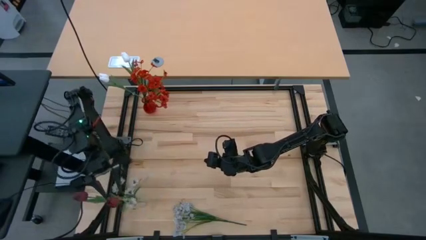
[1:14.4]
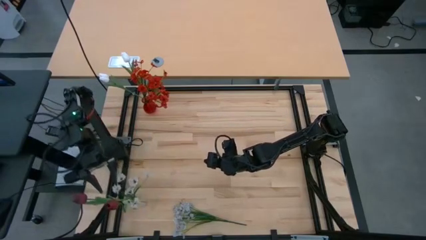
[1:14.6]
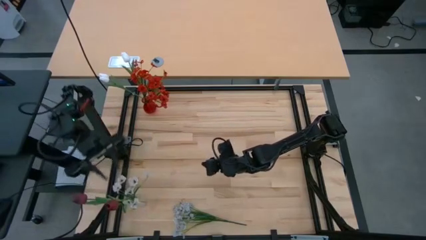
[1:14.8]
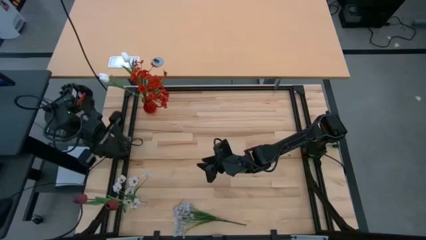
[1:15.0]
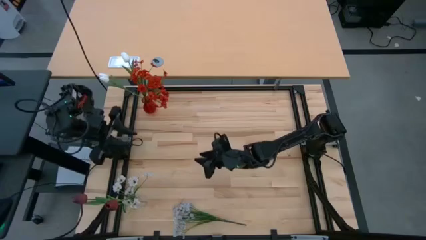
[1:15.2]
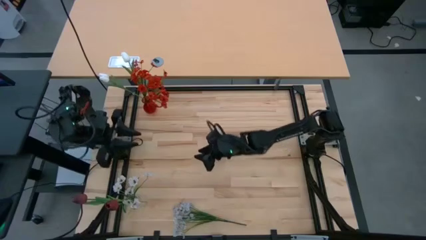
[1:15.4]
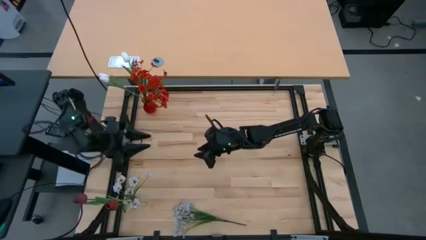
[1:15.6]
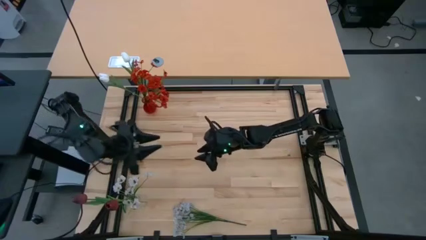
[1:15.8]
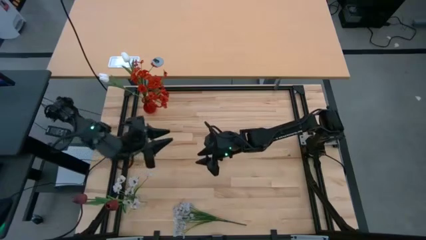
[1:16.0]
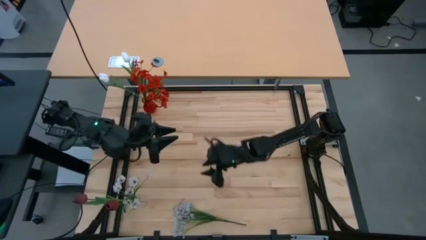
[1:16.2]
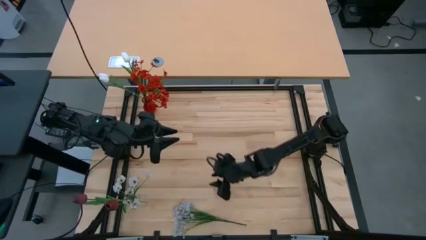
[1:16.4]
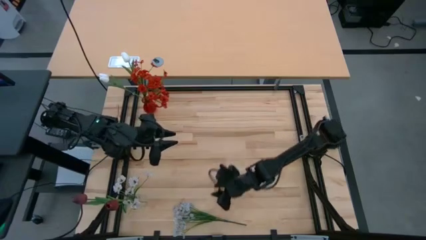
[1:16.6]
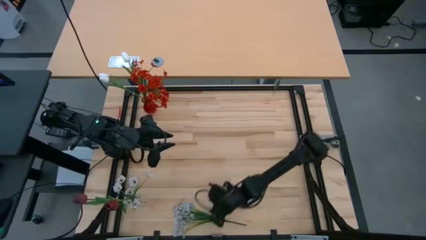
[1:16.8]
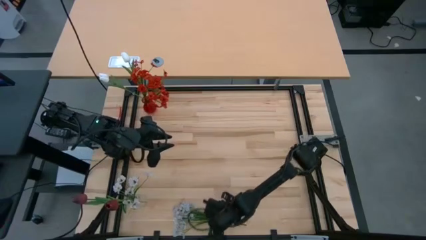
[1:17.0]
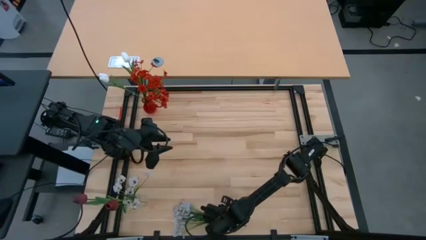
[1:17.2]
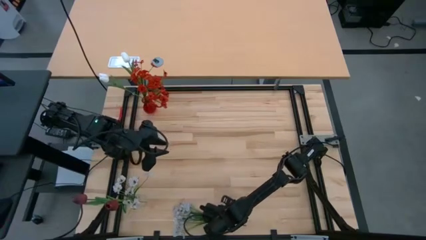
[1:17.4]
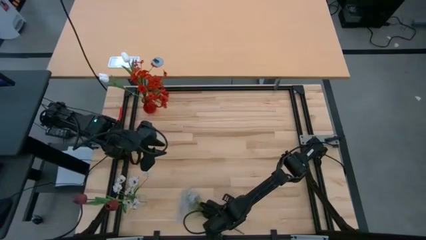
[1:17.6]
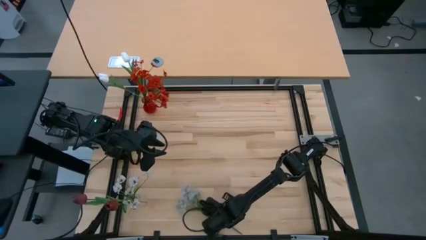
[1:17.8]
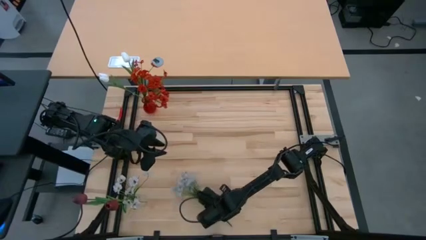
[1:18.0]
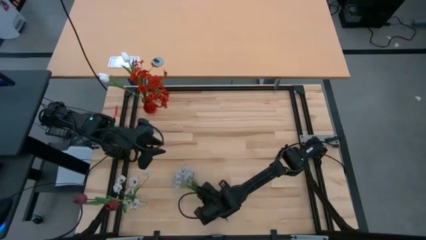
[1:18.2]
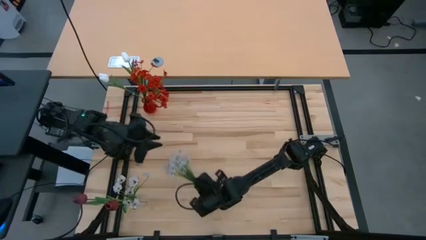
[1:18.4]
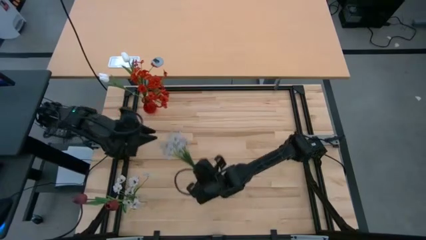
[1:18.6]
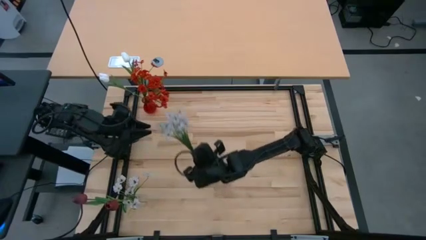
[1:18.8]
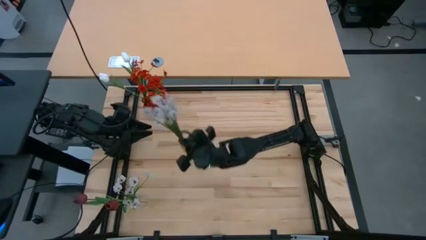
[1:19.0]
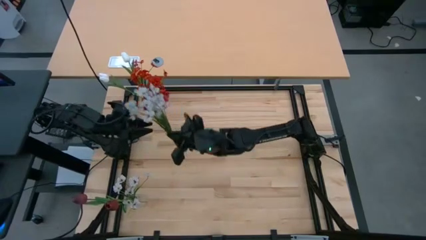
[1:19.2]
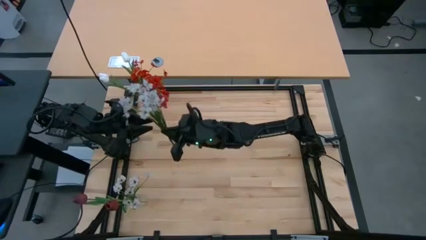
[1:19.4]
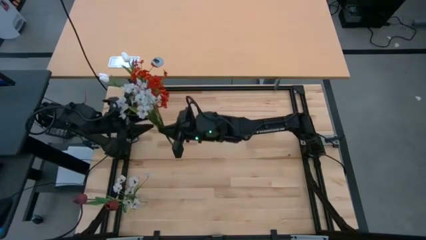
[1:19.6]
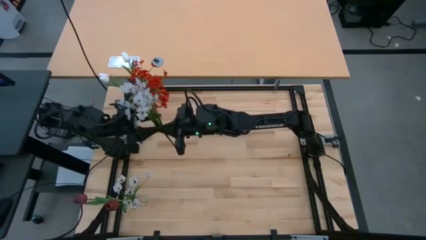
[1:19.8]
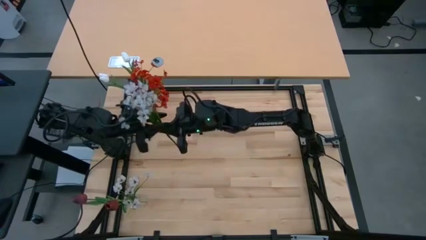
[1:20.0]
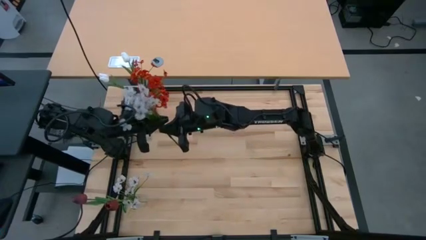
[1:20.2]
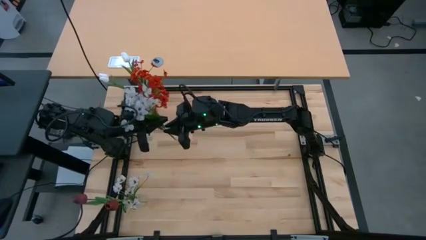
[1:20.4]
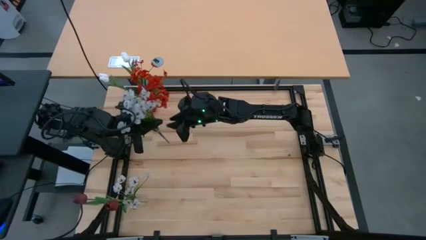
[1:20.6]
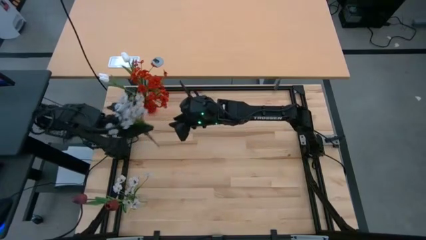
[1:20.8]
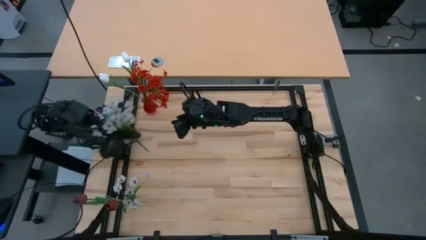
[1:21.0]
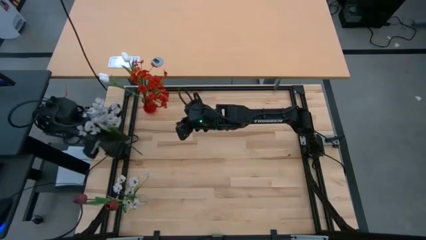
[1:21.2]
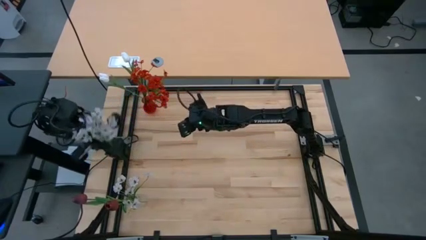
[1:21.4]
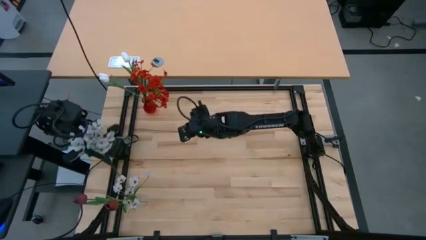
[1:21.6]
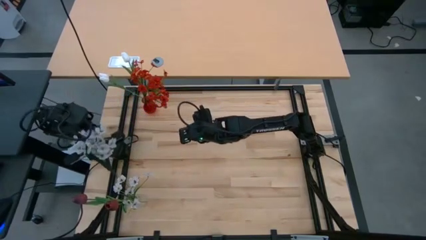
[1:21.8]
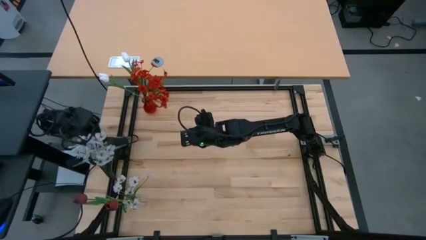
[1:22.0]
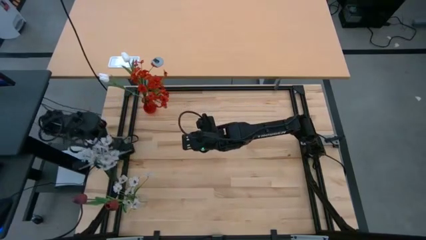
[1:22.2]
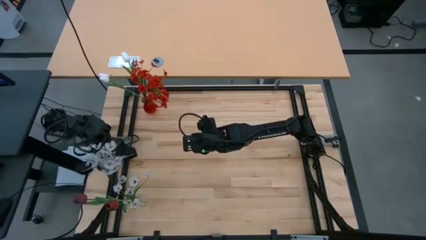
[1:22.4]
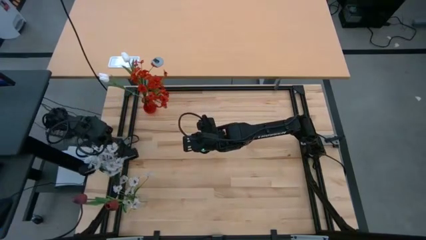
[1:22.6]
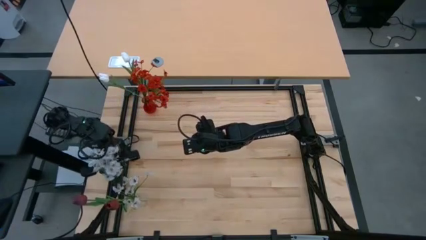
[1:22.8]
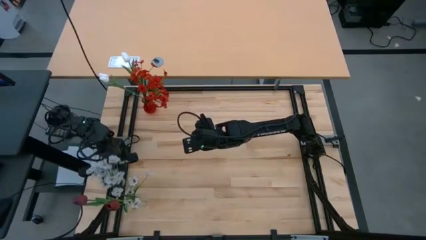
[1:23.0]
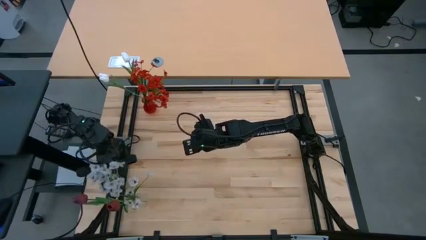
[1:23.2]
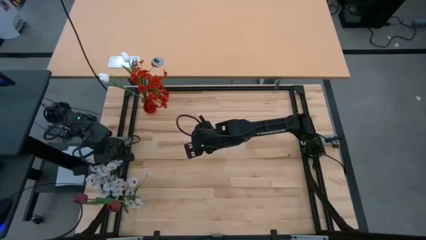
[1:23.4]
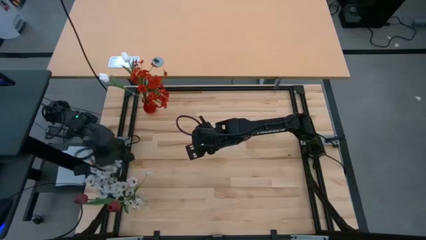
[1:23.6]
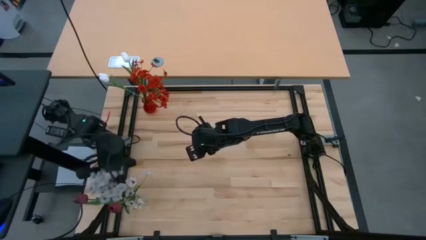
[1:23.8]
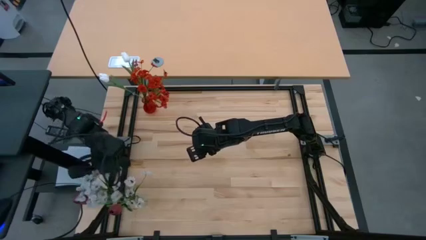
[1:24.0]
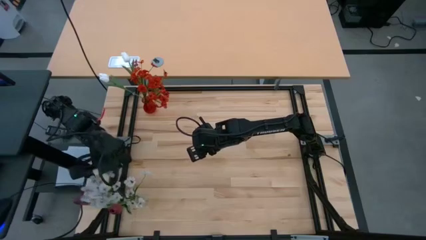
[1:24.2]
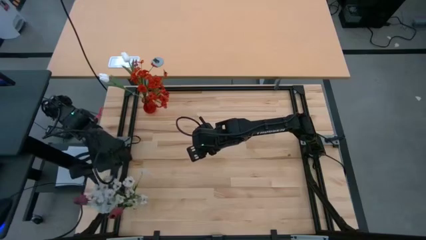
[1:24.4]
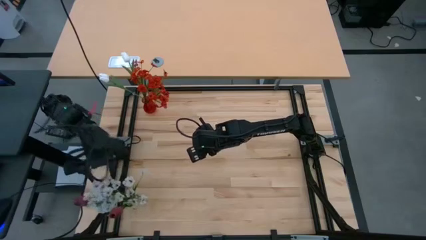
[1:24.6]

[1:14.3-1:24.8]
Task: Sort flowers into vase by color
Put the white flowers into the transparent vase

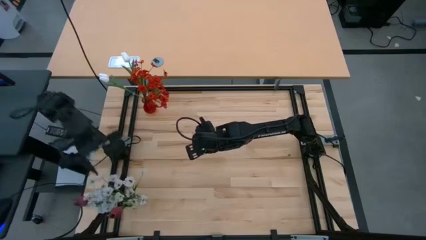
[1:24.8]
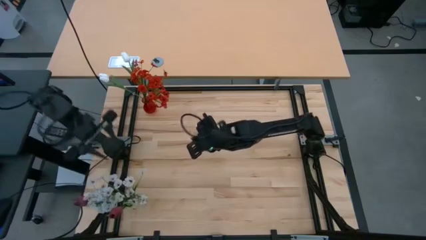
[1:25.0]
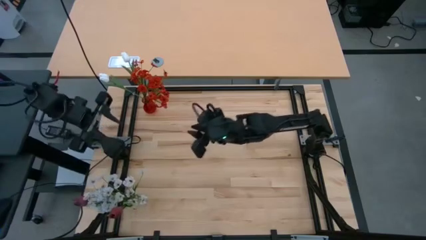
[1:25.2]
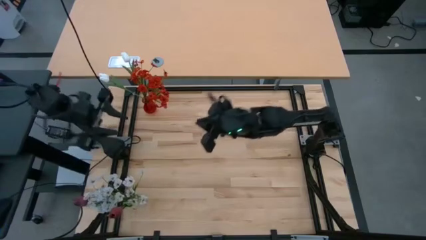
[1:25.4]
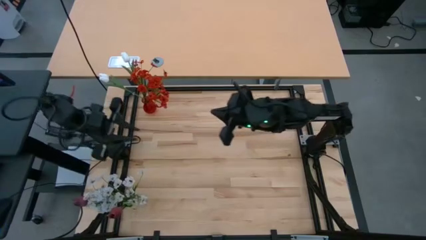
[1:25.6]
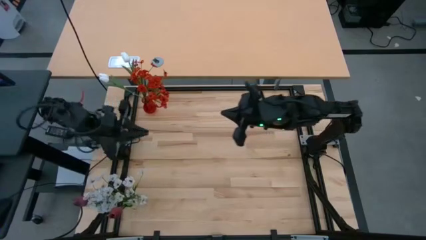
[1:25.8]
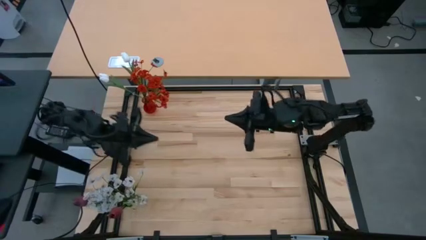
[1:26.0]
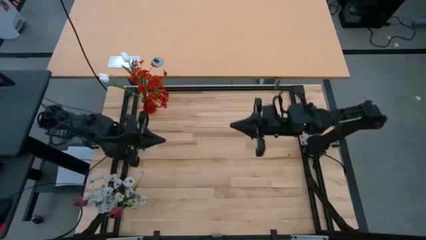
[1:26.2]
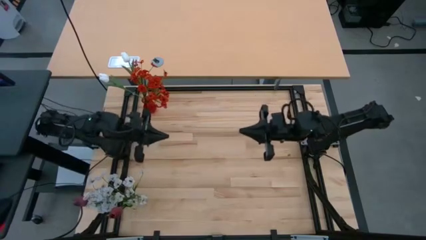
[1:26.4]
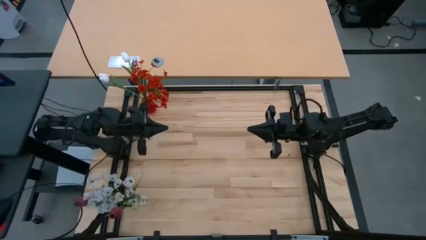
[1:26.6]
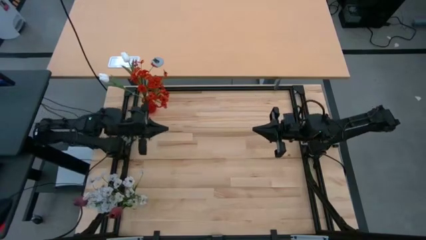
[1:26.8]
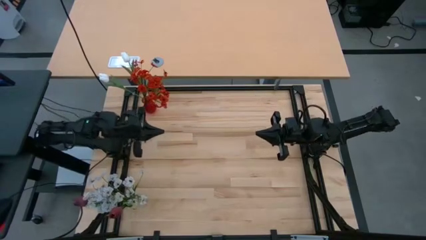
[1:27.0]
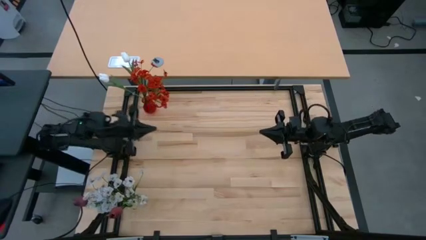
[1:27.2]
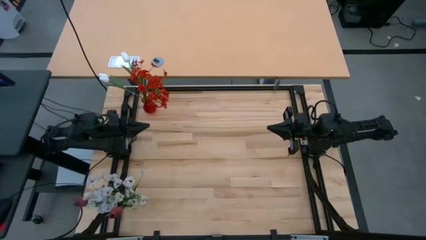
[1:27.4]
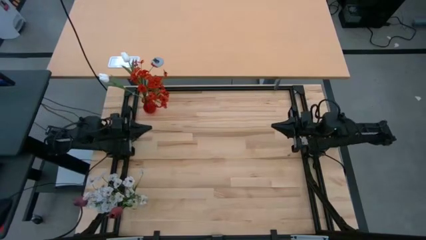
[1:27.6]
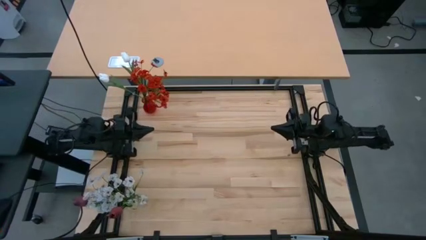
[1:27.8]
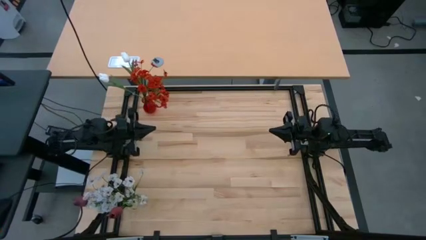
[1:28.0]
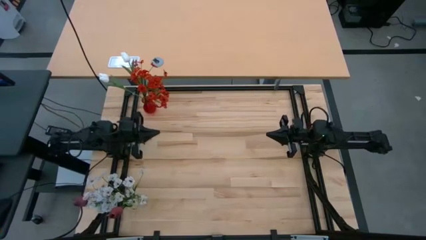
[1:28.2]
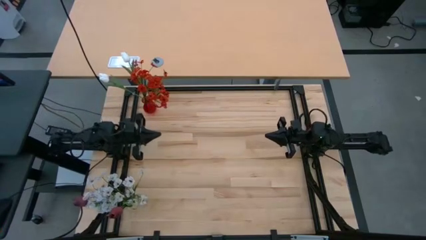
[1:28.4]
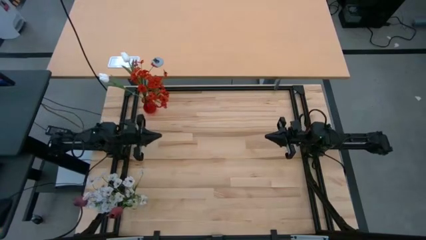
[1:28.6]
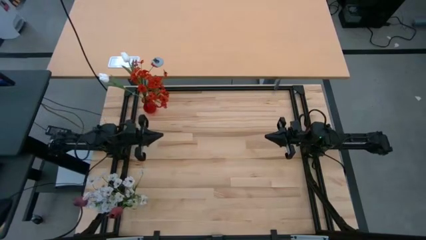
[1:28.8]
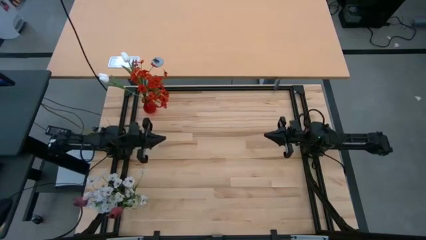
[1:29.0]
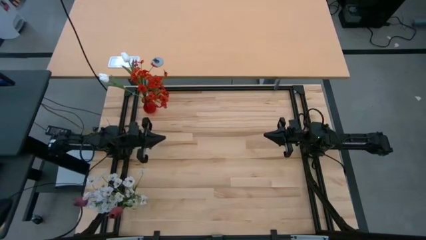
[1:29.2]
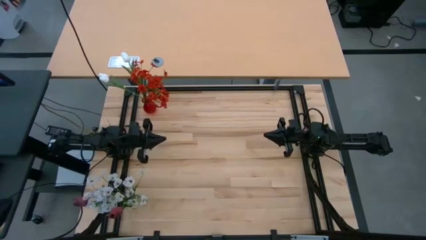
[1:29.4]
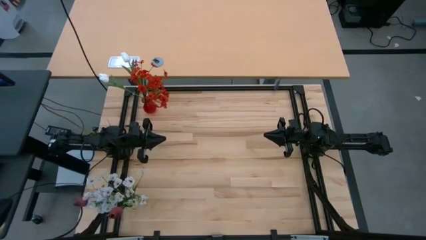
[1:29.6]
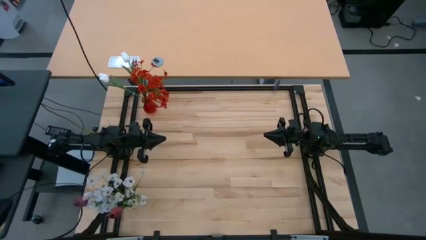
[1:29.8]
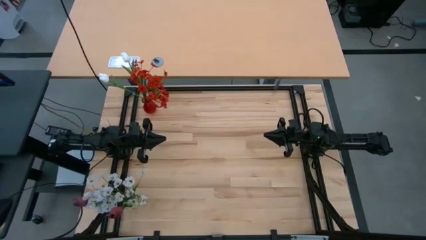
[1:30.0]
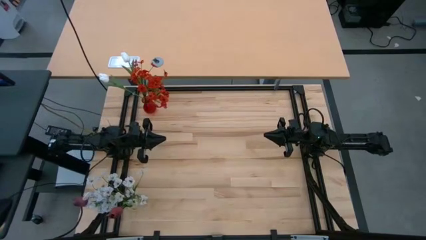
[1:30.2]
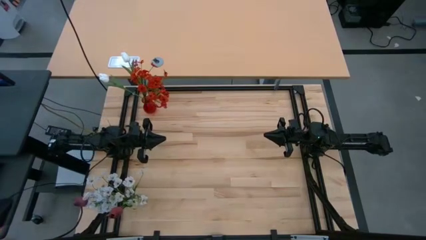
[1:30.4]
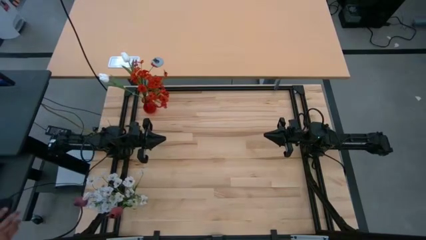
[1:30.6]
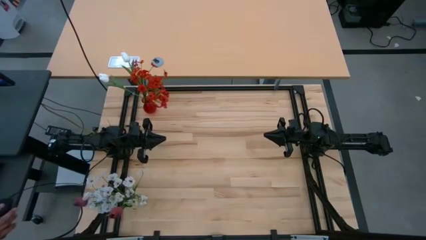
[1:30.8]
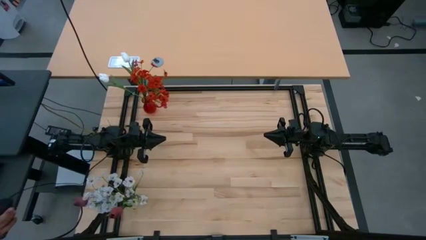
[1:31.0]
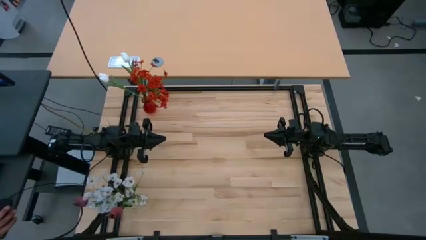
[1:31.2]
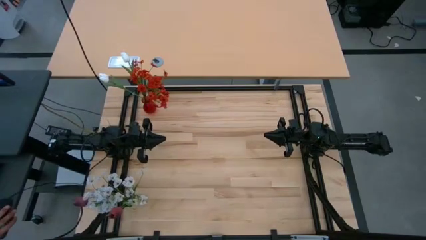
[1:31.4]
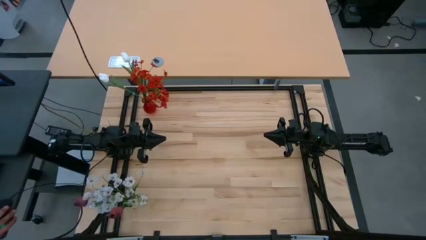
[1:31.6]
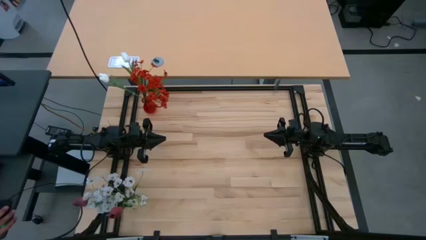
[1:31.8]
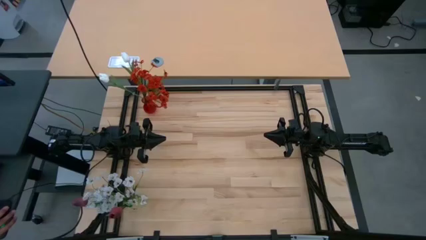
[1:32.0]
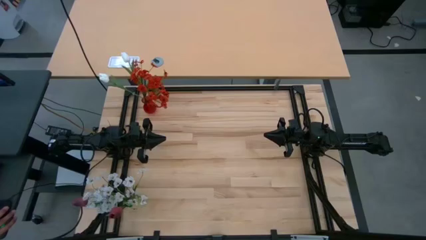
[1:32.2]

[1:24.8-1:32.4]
Return to Home Position
